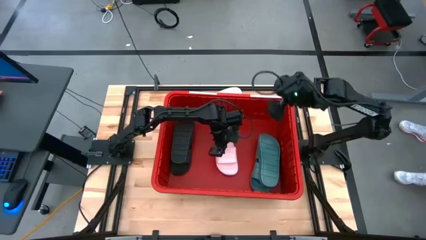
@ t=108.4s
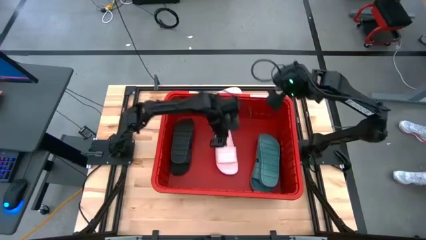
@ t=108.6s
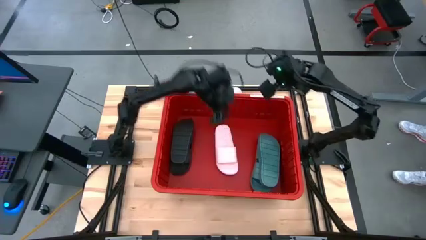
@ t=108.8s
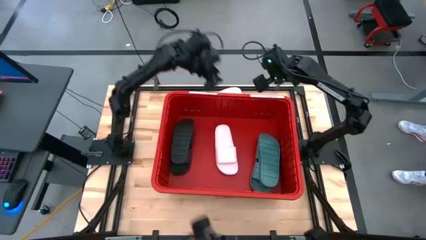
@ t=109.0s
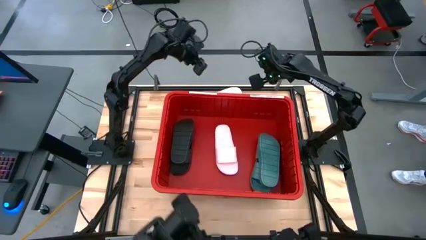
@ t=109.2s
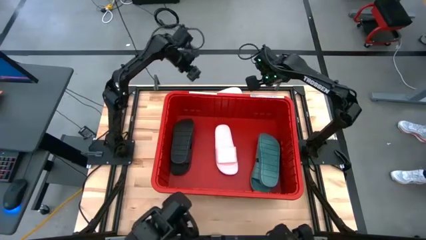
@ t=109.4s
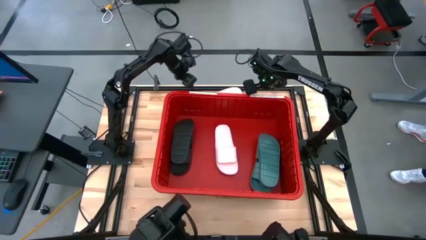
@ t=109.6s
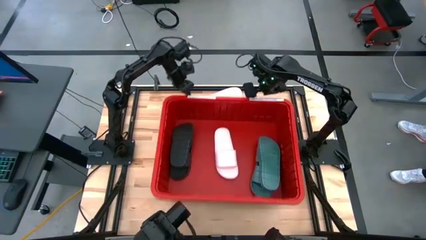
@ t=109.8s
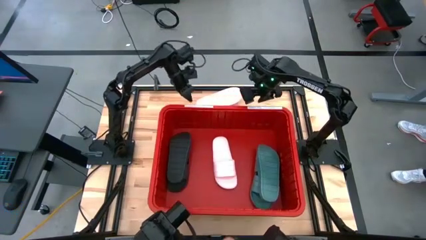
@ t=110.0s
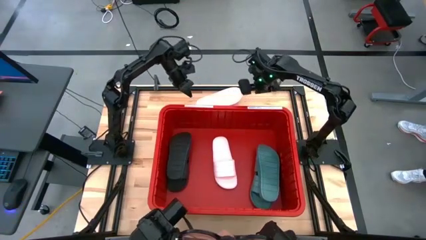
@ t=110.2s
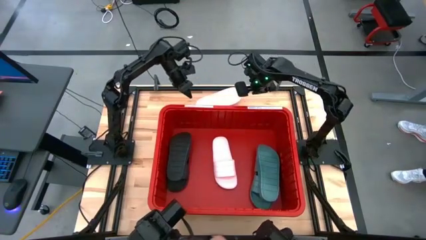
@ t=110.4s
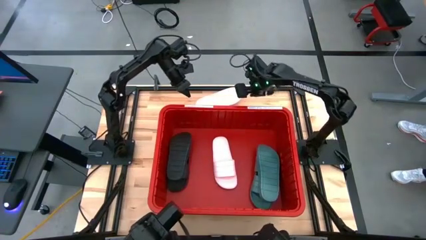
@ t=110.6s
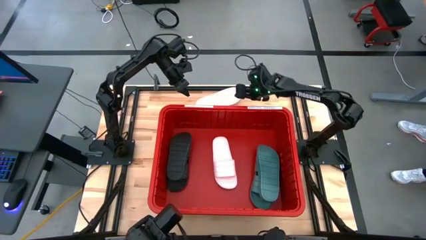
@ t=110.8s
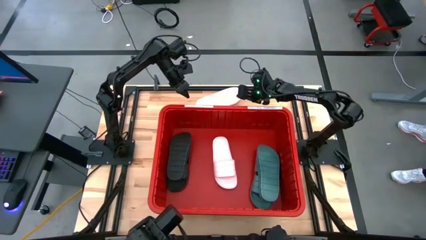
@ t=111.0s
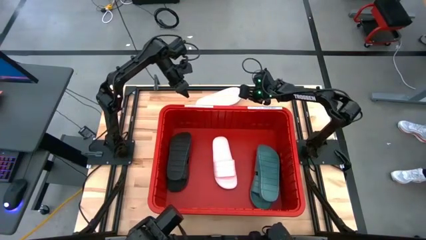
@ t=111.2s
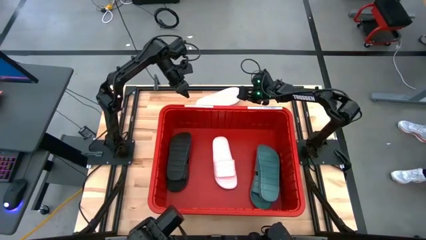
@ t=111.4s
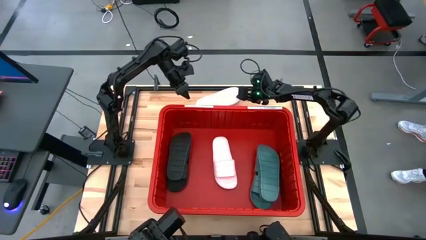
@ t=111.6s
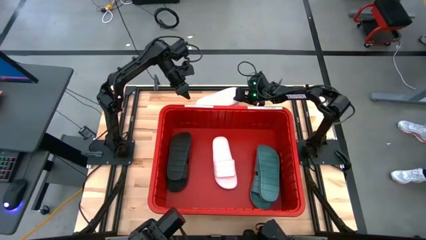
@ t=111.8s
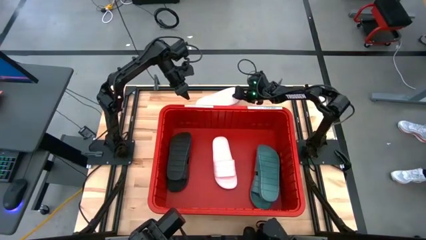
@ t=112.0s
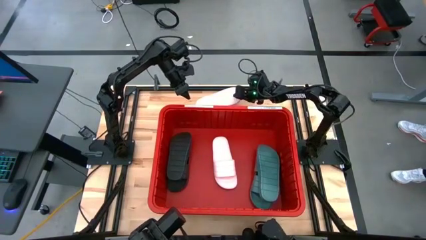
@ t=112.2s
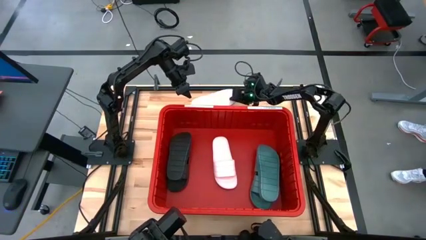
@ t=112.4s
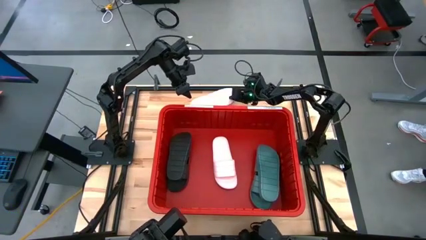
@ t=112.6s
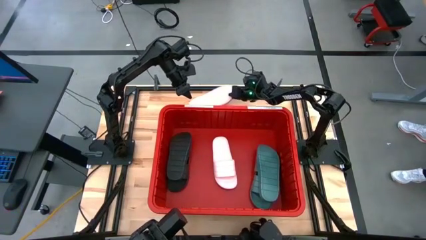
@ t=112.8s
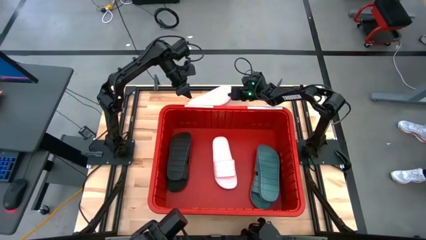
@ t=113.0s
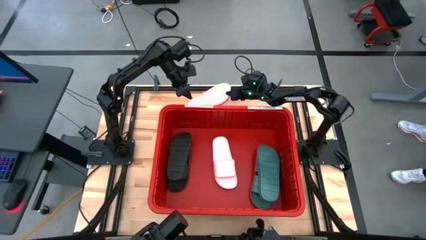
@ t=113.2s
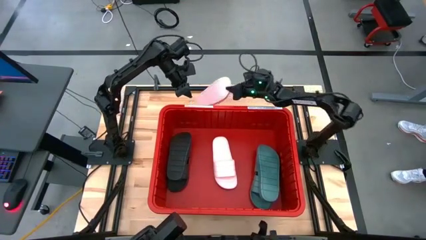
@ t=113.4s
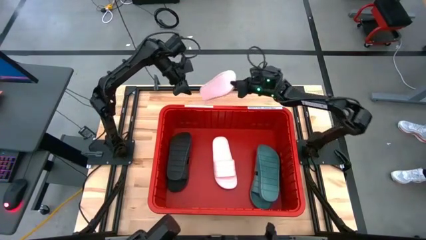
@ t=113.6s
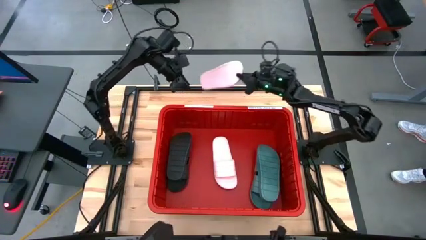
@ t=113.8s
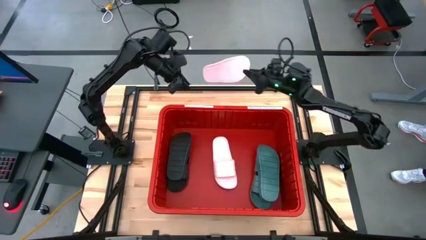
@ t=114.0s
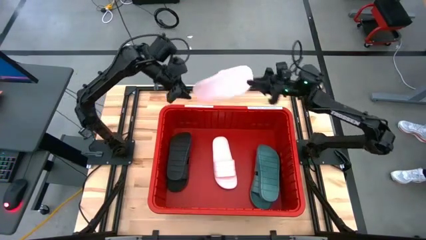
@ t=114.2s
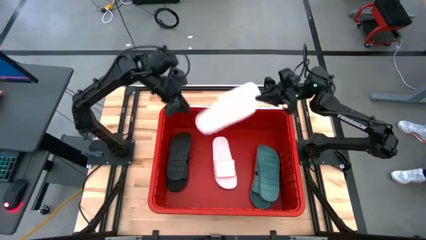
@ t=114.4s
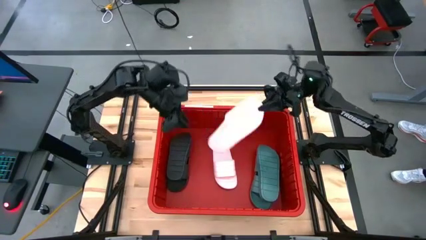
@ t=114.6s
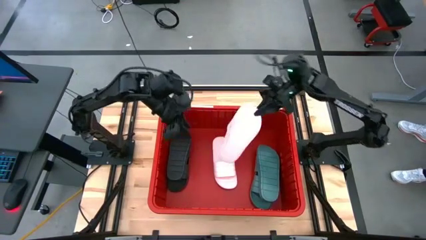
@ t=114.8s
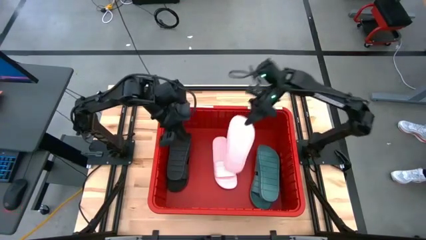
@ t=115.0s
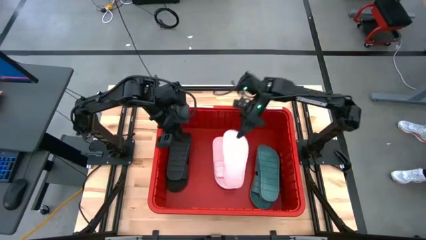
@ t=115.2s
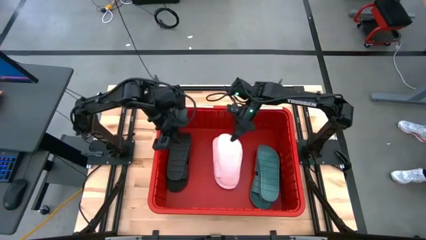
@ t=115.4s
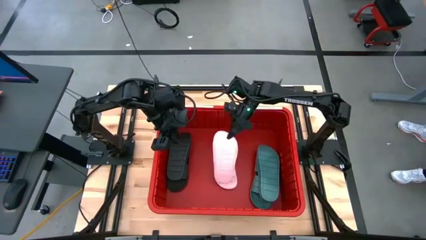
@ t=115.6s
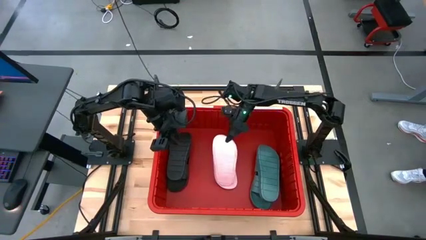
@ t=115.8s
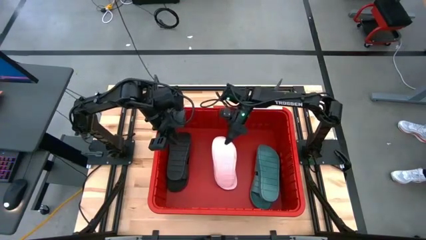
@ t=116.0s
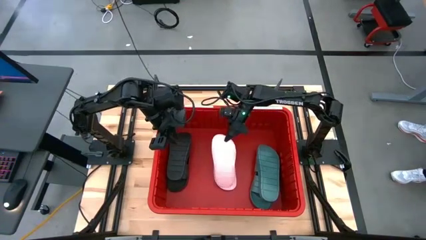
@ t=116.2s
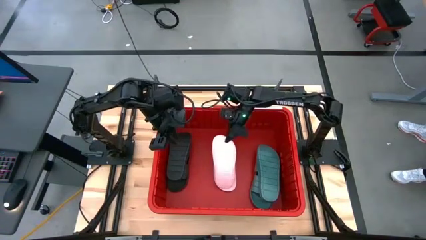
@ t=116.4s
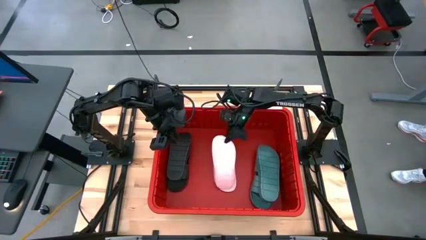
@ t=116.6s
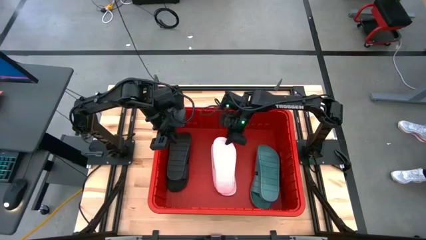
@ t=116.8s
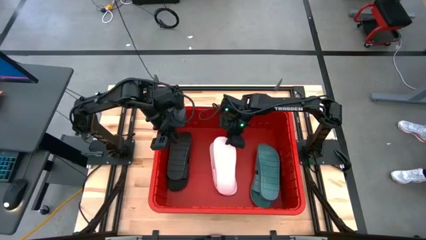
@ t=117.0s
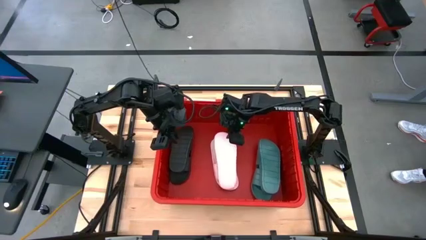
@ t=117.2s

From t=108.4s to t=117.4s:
Task: Pick and place slides into bin
Put the pink slide on top of the other pink slide in the container

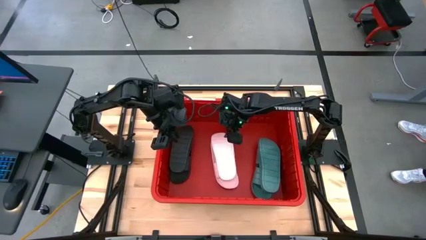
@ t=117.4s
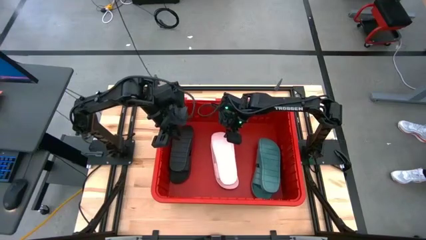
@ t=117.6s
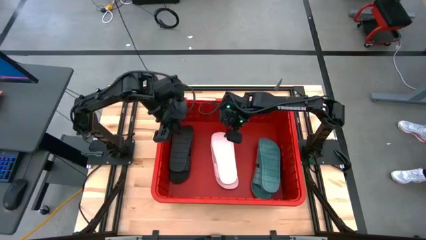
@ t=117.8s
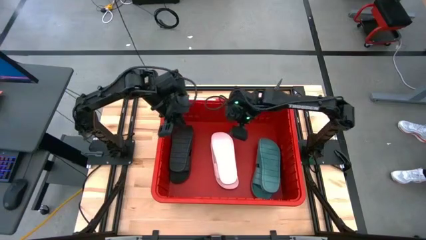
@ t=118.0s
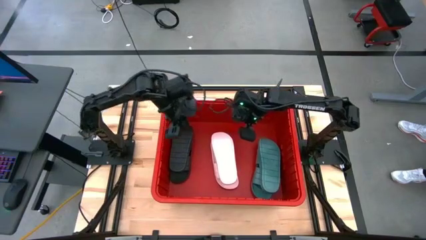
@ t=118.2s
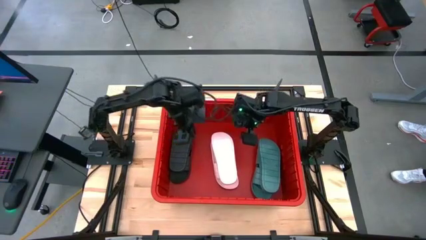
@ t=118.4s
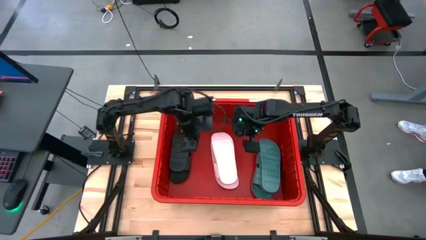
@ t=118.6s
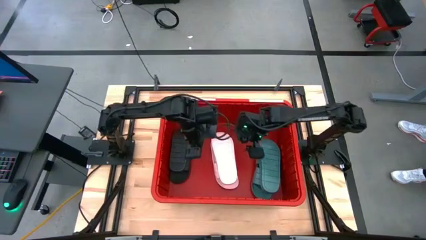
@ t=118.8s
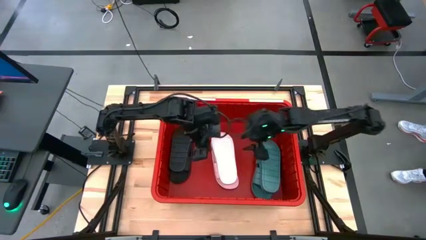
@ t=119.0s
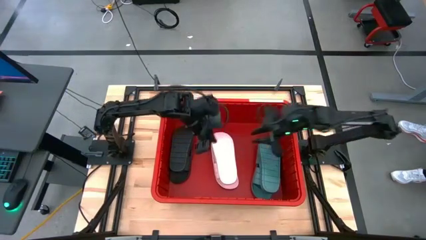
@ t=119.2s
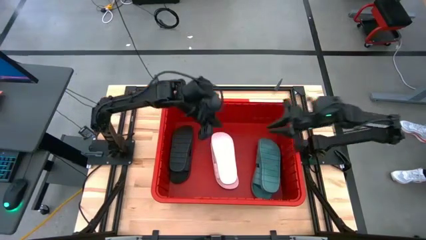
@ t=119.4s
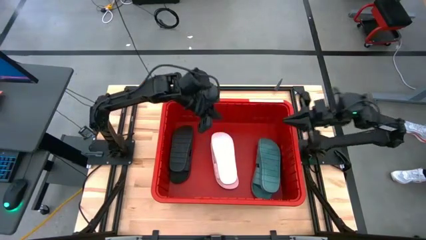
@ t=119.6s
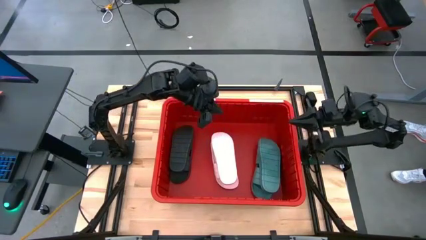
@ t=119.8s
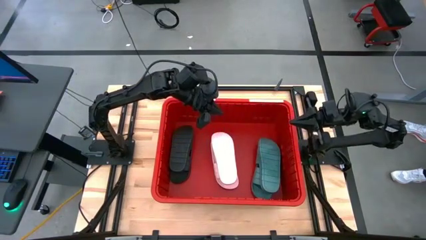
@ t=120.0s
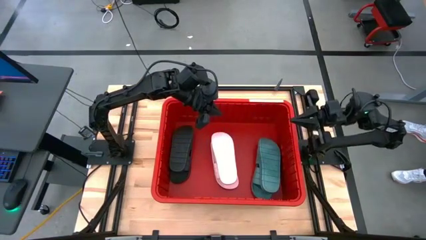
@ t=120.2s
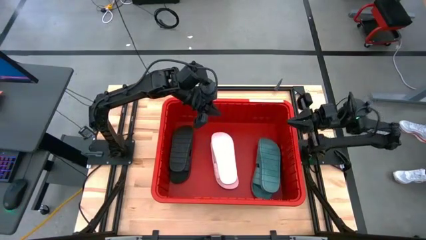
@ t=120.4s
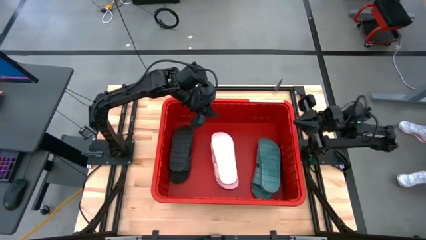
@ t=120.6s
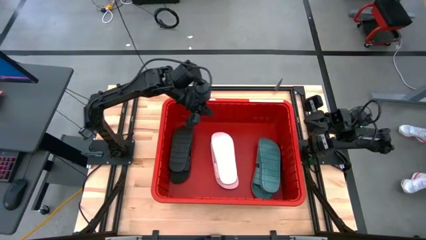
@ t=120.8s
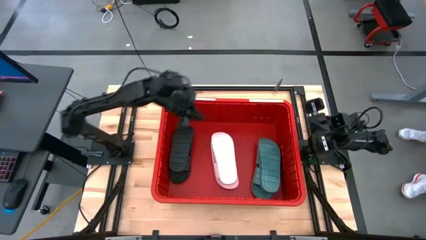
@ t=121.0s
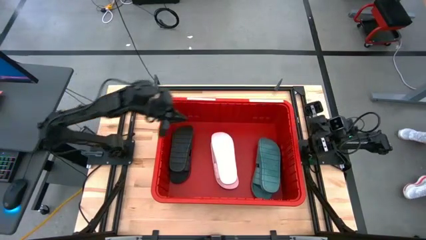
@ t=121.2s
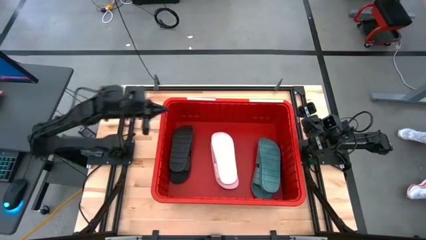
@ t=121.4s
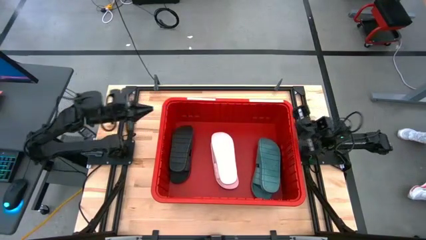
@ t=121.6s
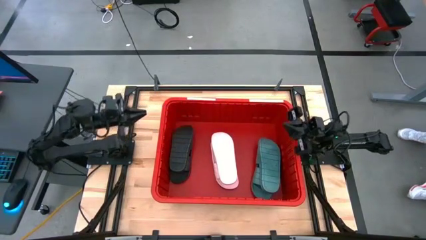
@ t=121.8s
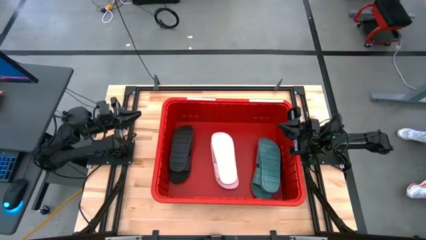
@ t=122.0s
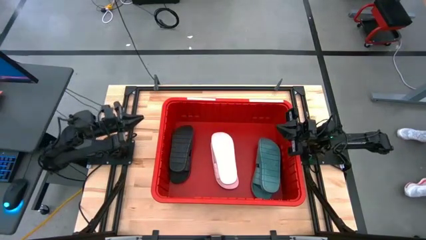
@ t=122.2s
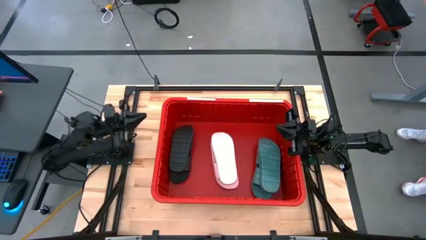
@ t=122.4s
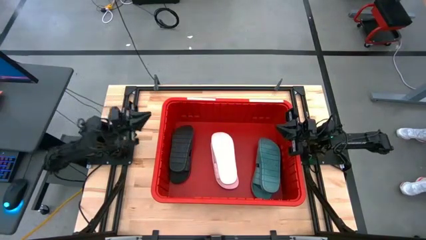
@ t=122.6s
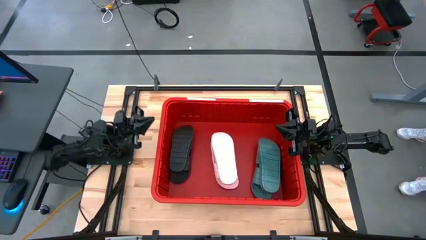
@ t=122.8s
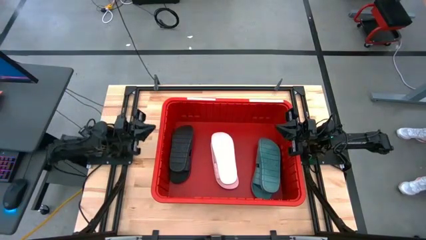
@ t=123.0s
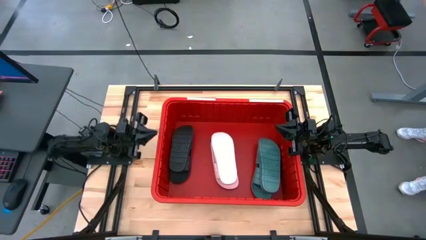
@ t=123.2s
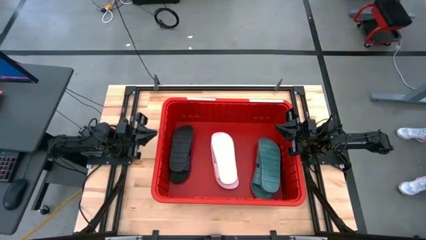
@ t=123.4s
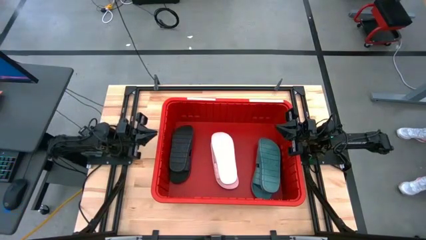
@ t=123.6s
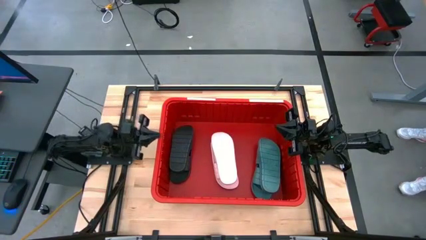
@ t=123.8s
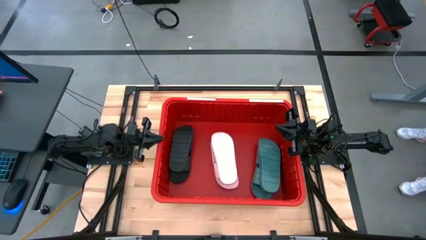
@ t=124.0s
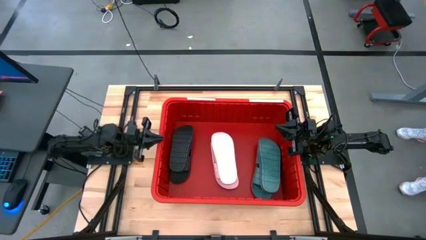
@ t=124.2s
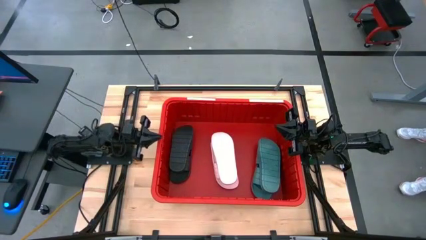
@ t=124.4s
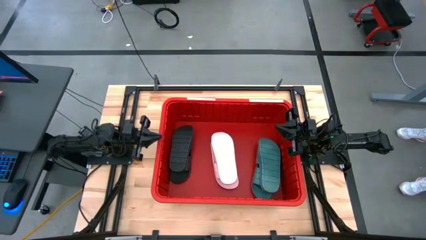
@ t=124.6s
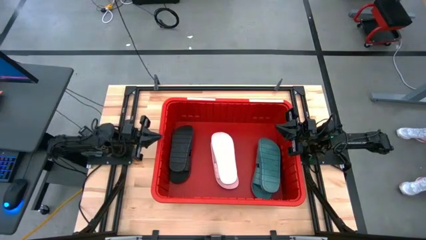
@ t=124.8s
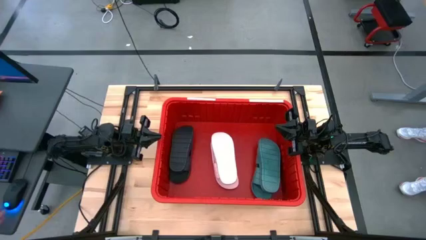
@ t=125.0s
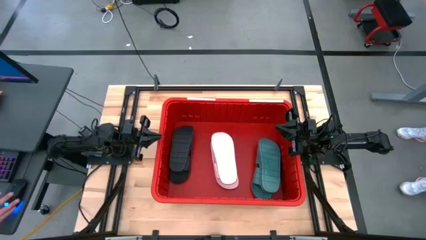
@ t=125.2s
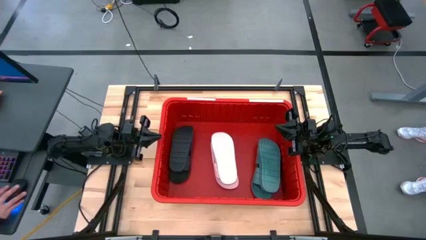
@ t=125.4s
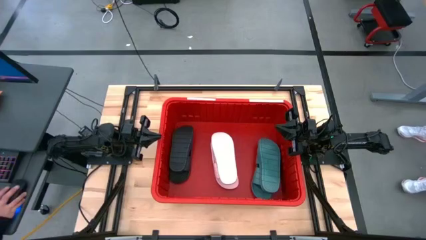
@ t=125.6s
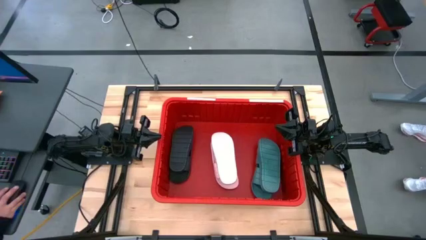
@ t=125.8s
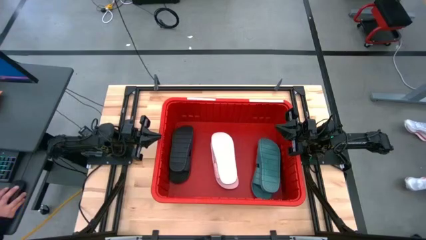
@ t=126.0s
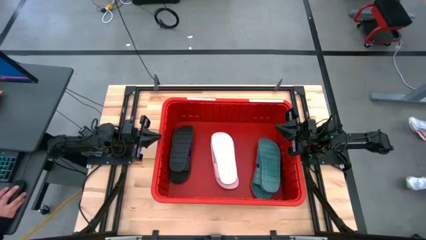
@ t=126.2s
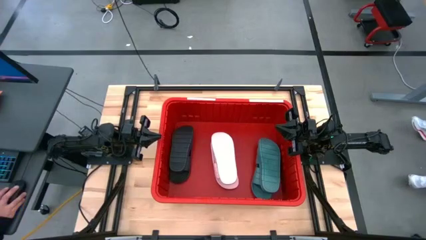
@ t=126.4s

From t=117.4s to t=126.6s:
Return to Home Position
